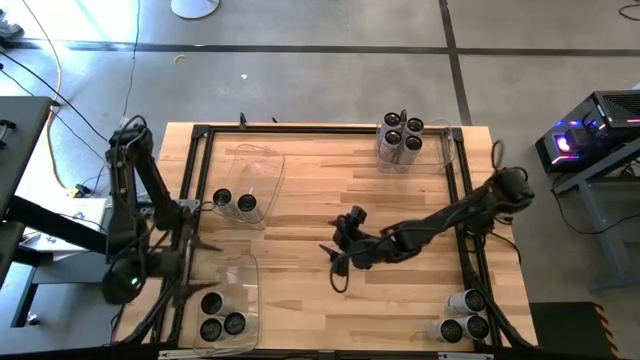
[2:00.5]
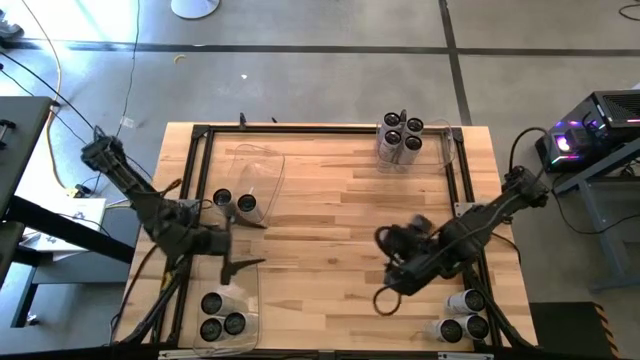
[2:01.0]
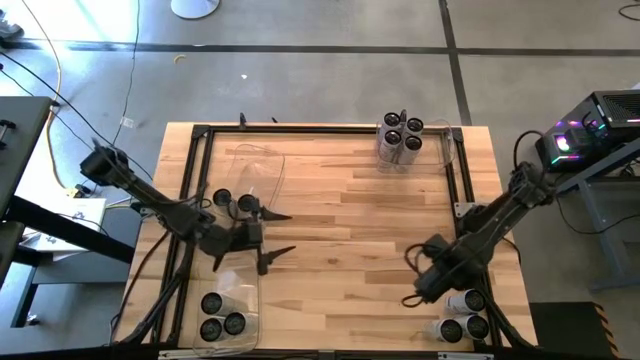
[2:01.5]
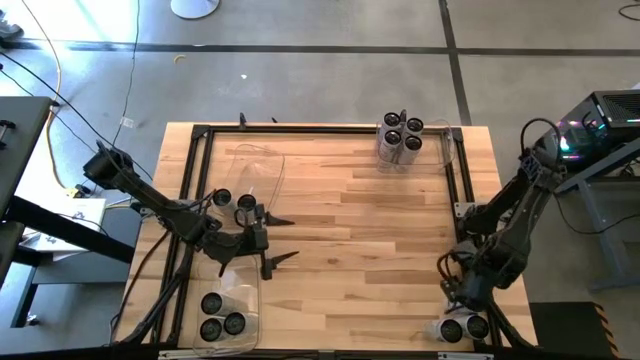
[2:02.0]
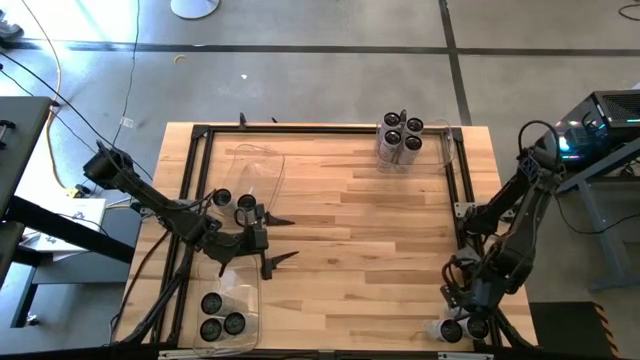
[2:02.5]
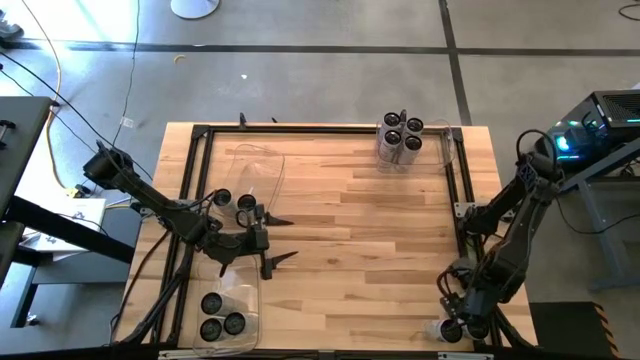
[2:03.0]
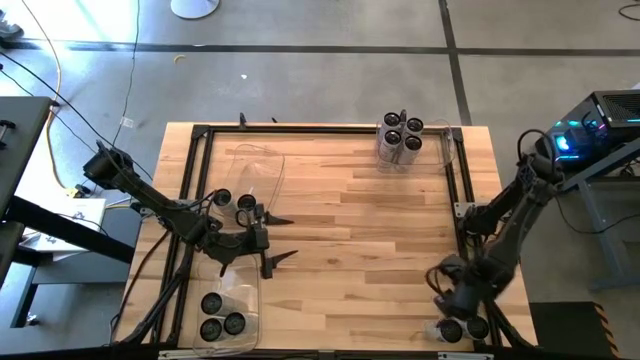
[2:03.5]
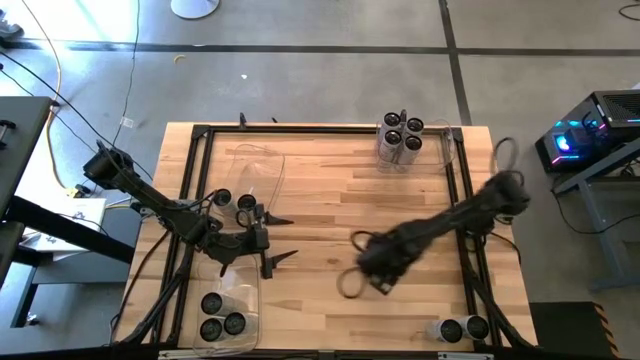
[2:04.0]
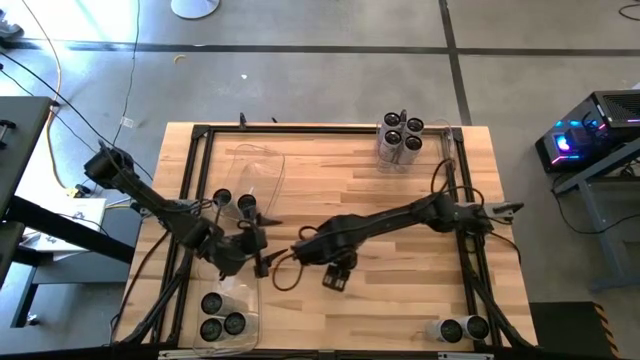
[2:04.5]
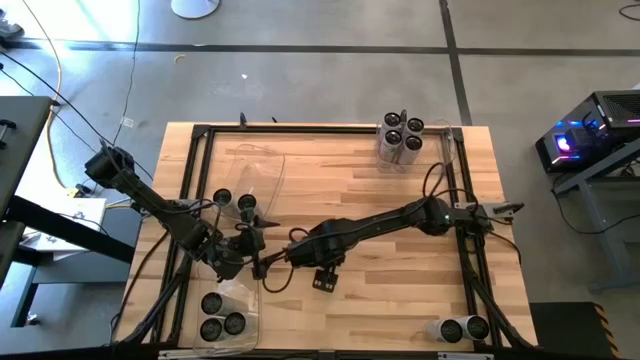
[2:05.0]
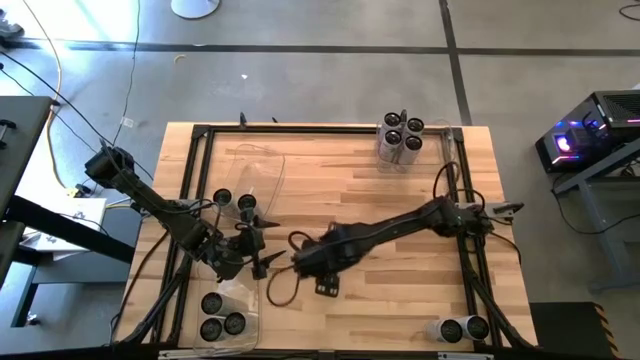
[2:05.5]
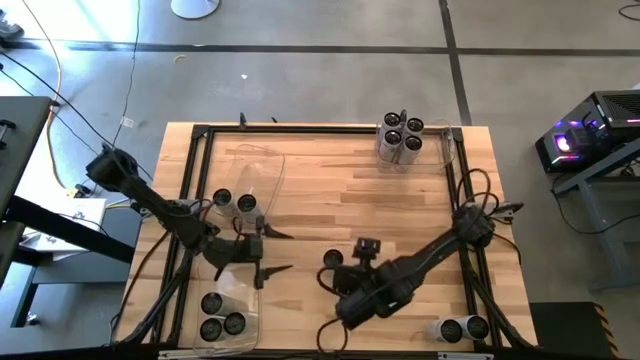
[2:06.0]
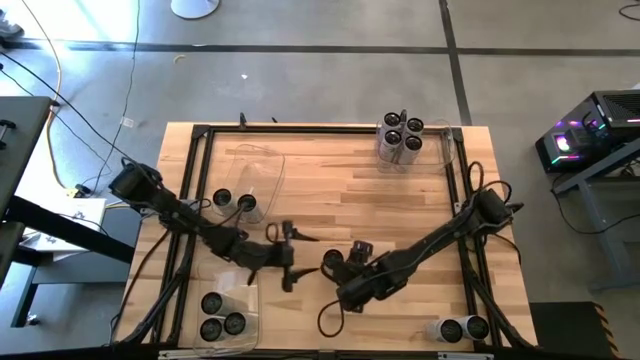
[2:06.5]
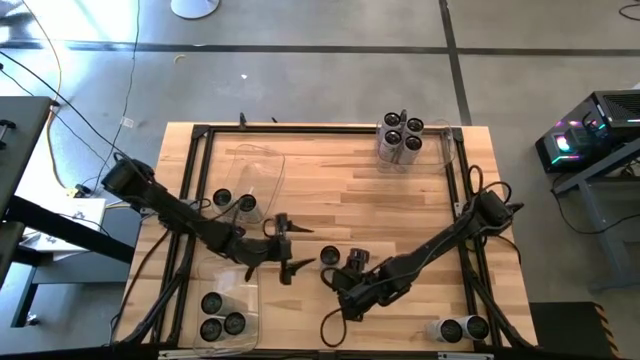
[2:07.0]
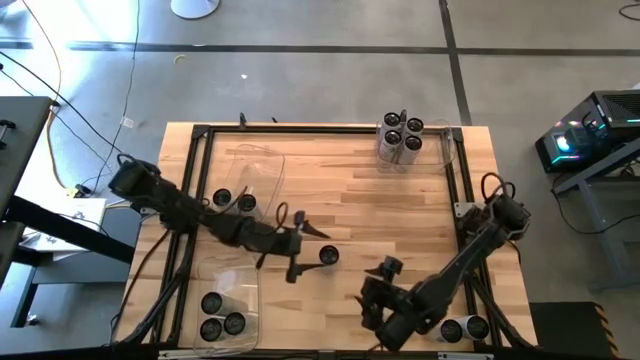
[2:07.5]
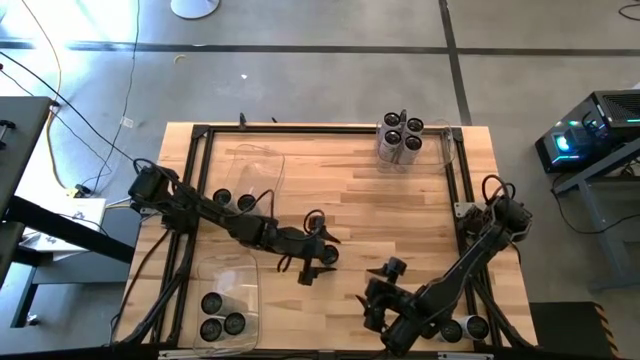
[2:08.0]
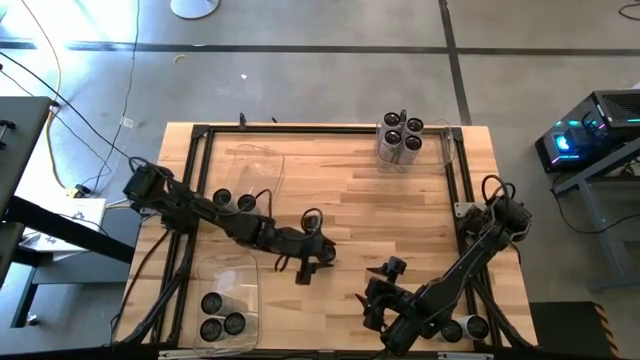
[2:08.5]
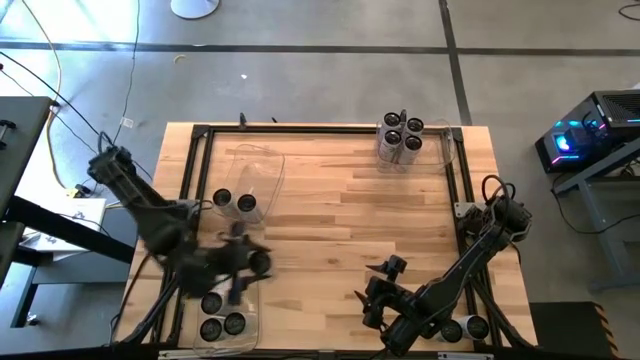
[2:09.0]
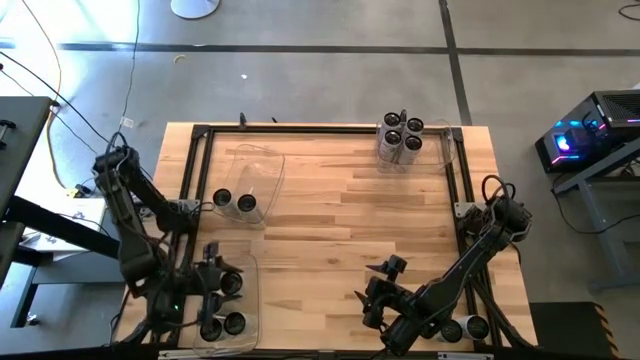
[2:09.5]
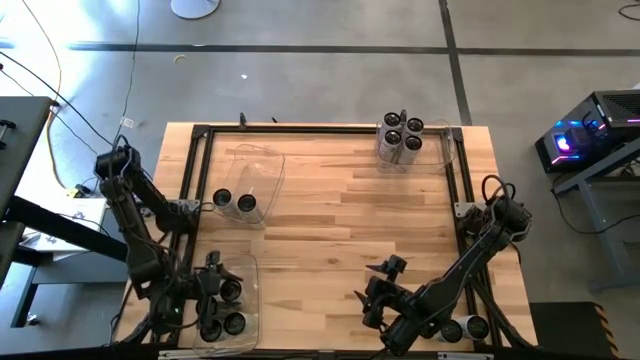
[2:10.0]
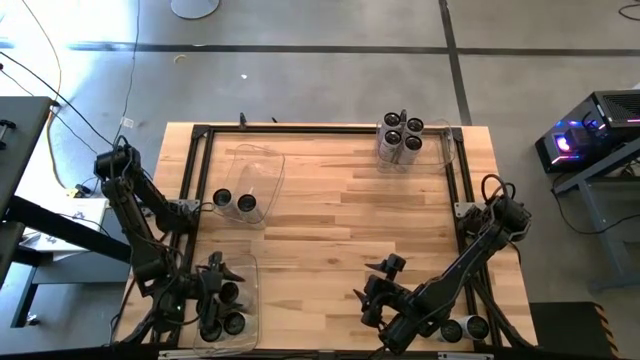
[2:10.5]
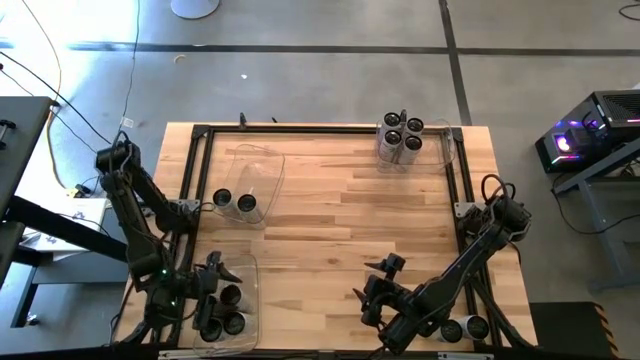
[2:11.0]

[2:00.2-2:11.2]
Task: Sort soda cans
Put the white blue soda can into the bottom transparent bin

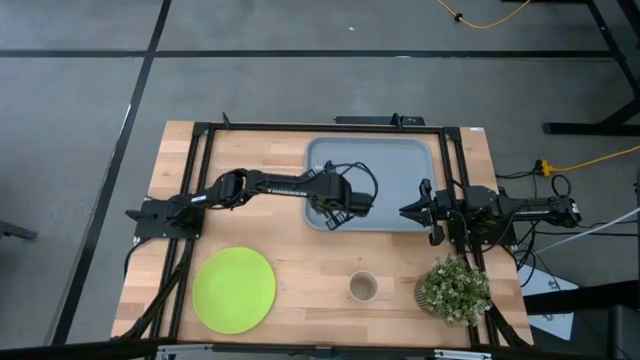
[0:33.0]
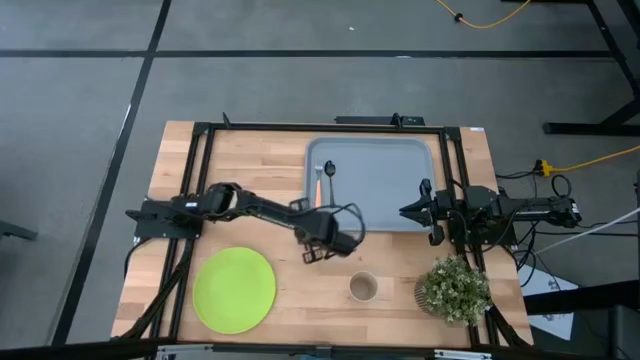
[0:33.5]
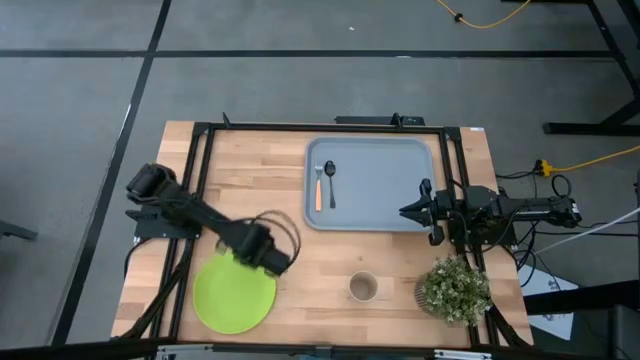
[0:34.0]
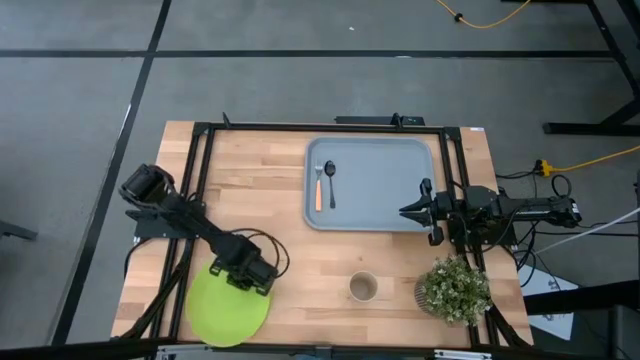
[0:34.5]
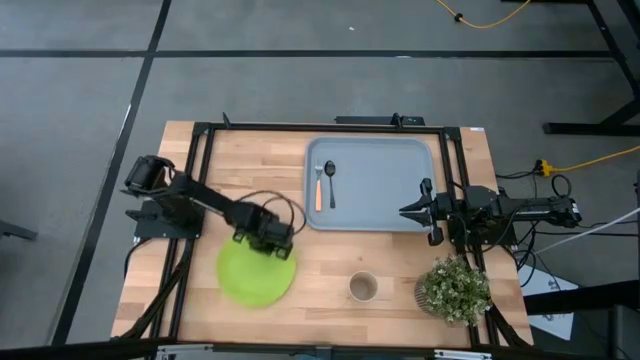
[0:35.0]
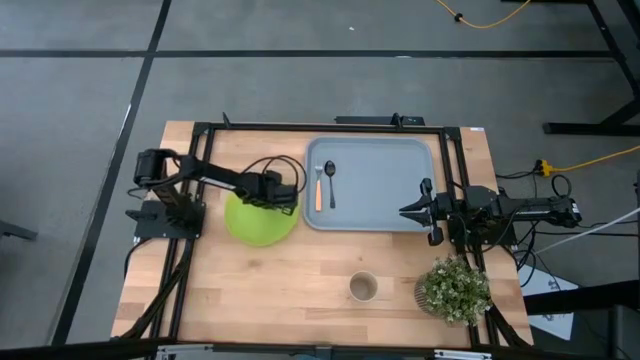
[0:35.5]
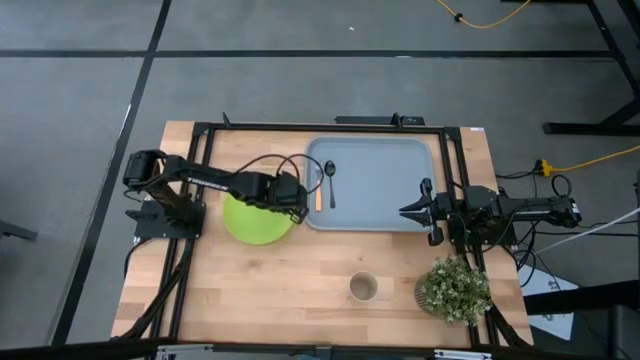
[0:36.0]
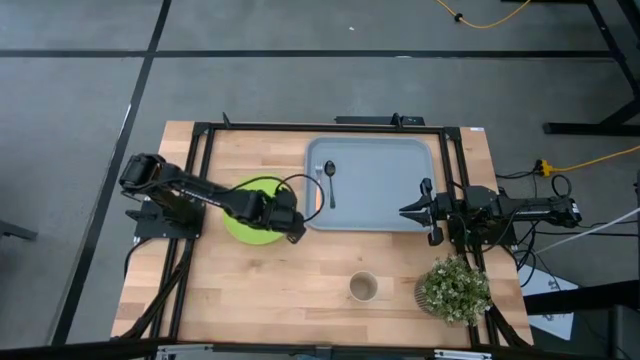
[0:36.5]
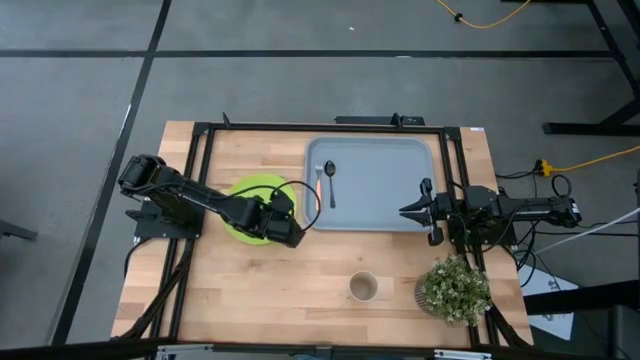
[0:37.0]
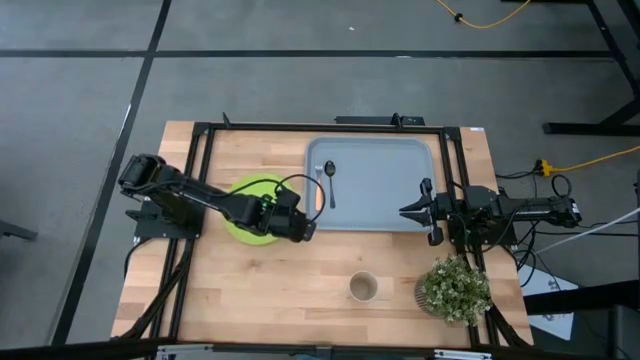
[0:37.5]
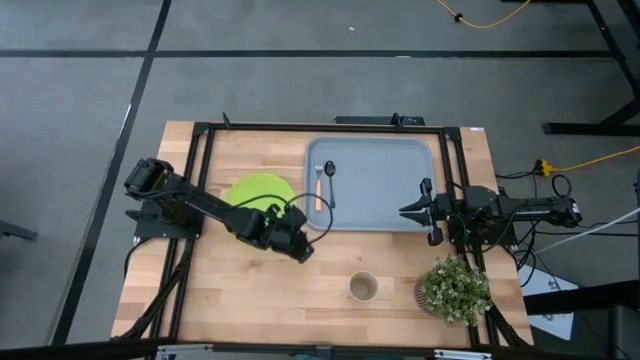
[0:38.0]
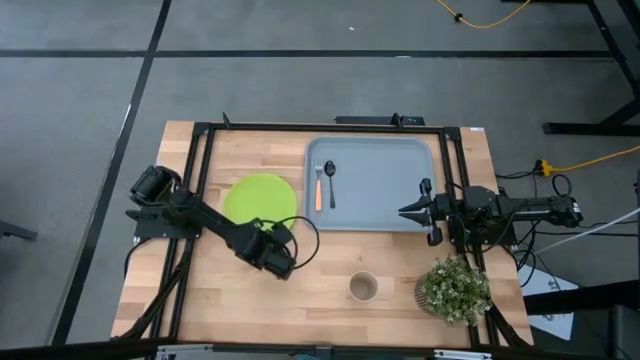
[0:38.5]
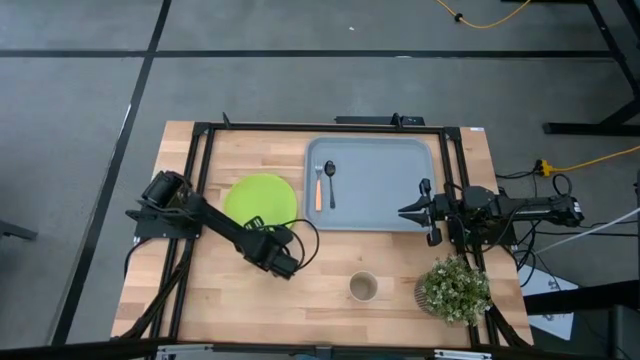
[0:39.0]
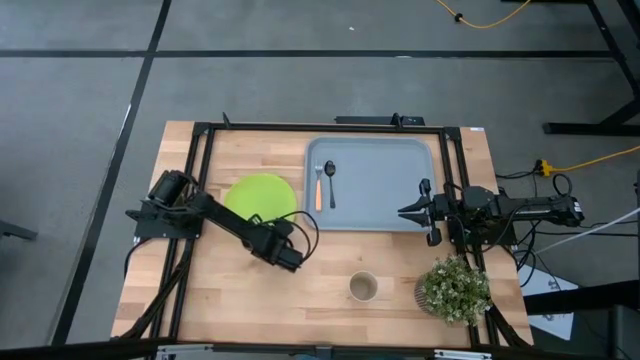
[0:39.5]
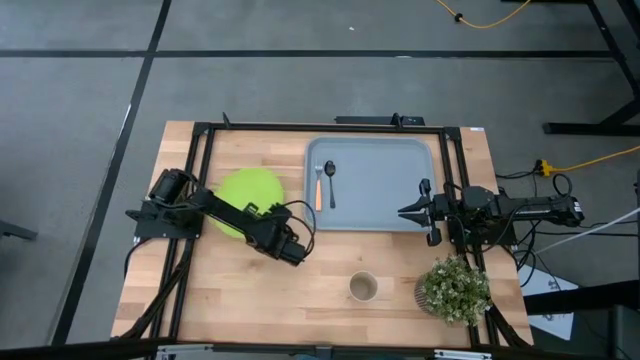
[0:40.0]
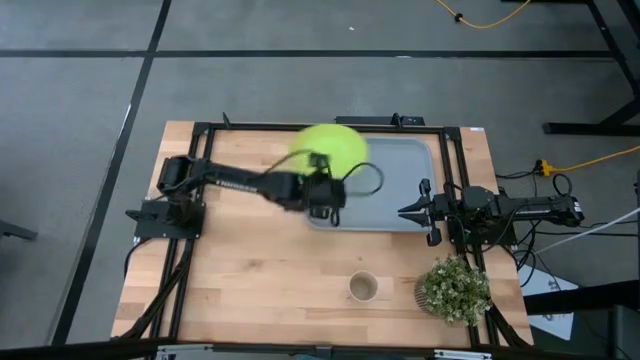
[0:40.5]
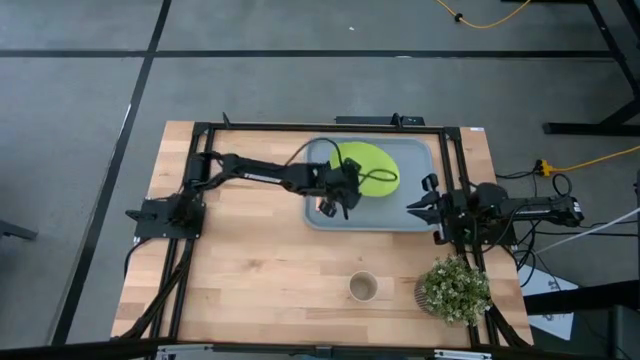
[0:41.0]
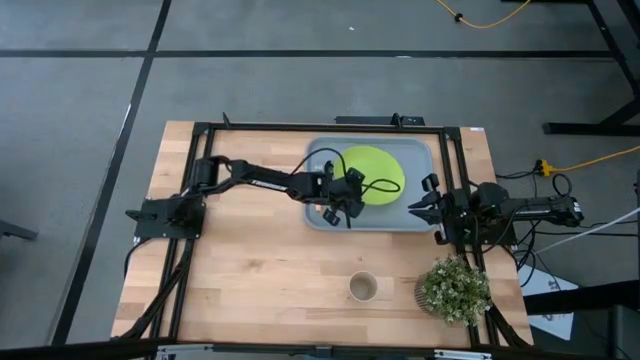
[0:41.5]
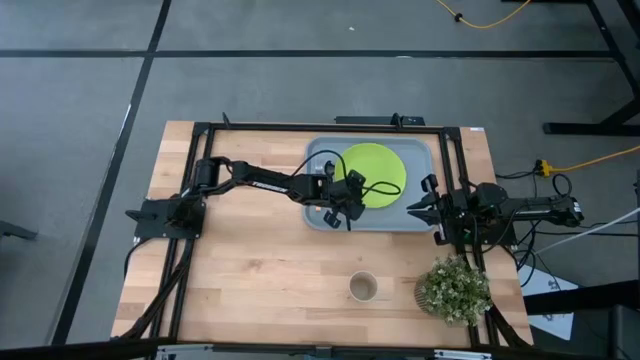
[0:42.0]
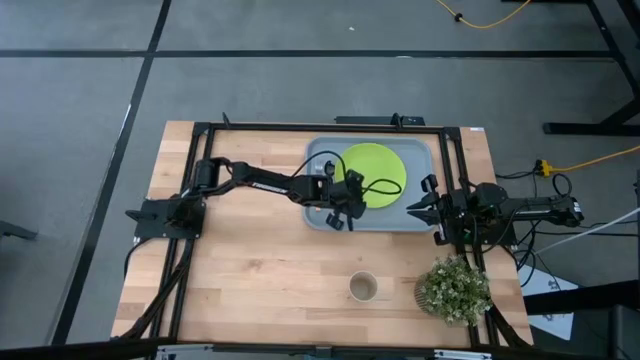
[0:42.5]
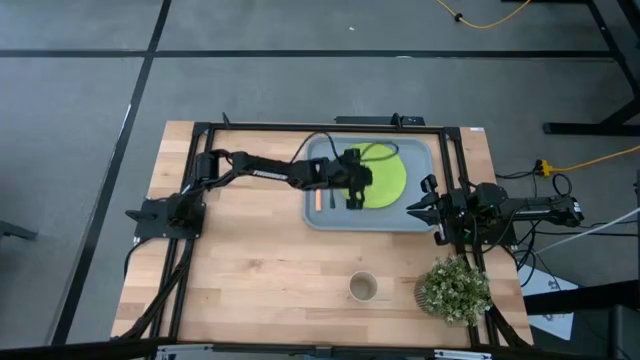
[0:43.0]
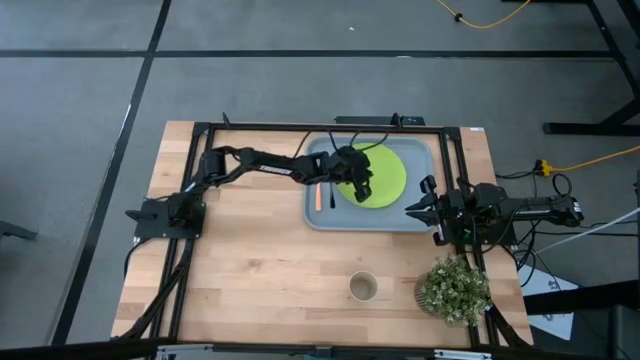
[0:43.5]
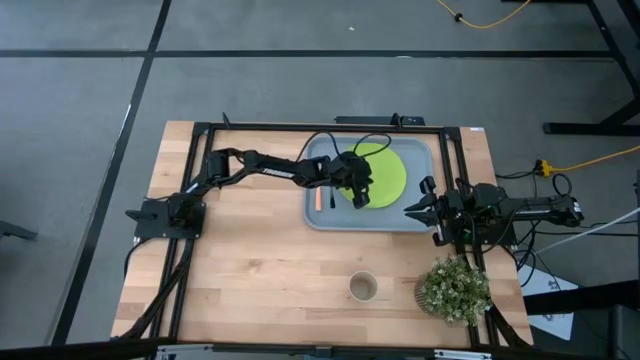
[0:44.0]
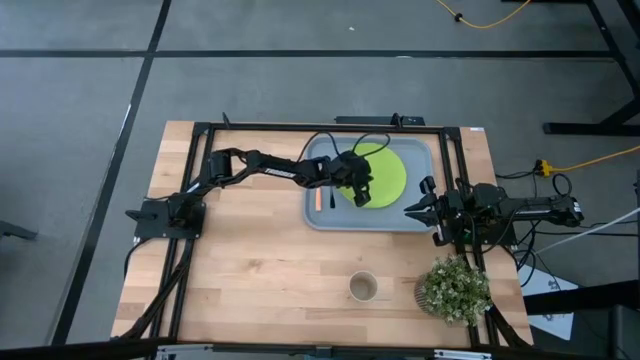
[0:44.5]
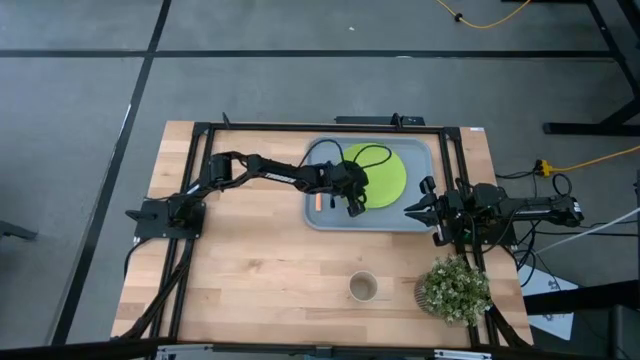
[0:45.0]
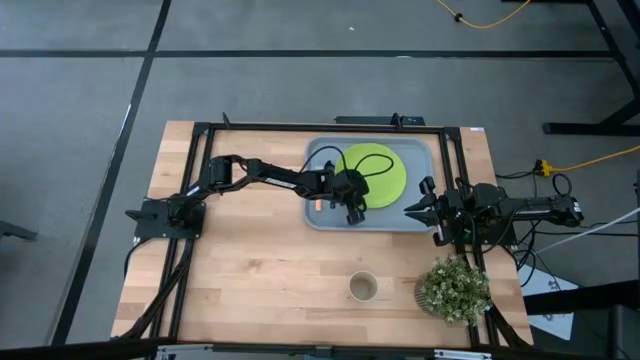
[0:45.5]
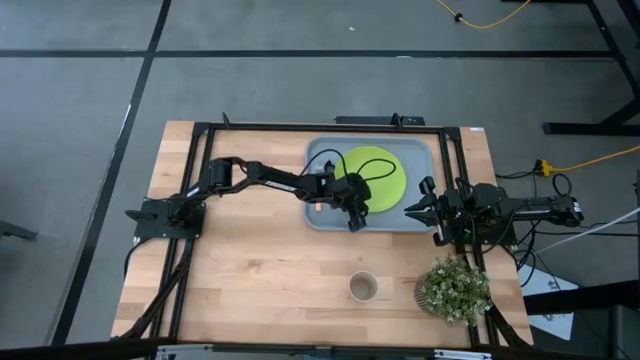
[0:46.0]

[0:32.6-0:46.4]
Task: Pick and place plate/cup/fork/spoon on tray
Put the green plate on the light blue tray to the right of the black spoon
